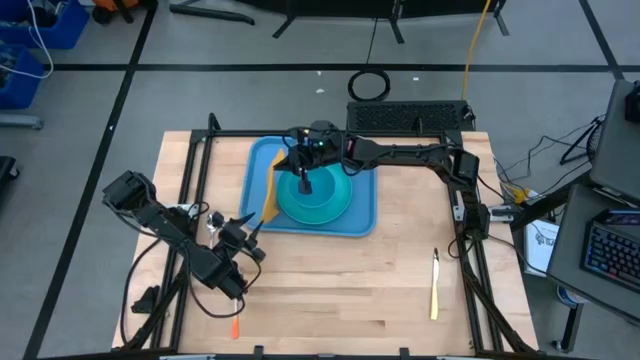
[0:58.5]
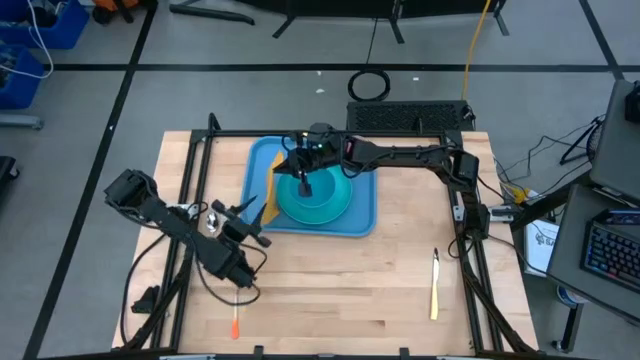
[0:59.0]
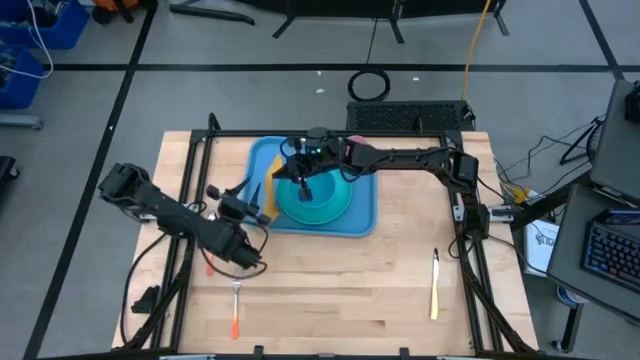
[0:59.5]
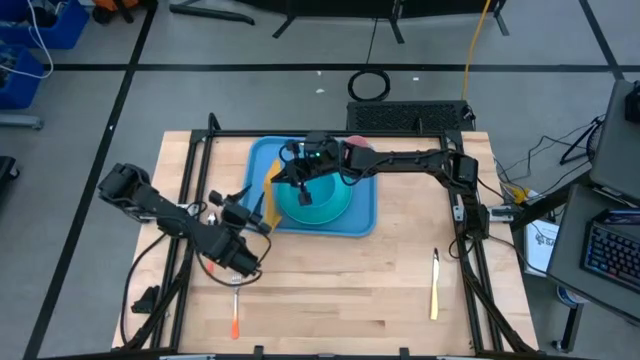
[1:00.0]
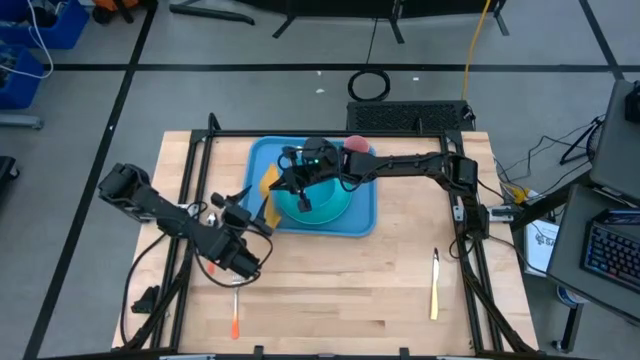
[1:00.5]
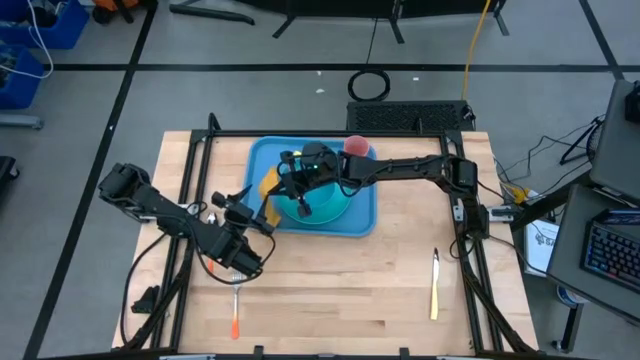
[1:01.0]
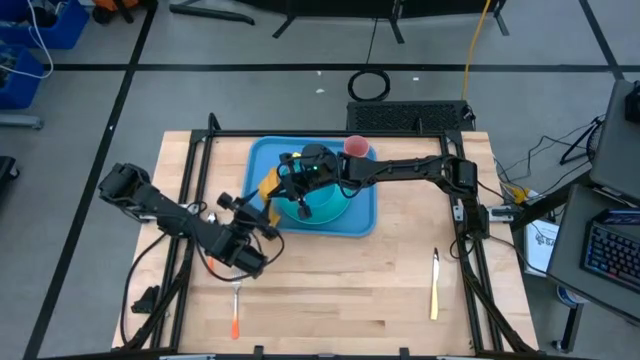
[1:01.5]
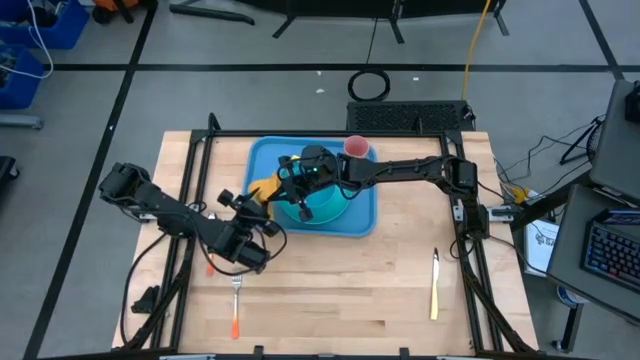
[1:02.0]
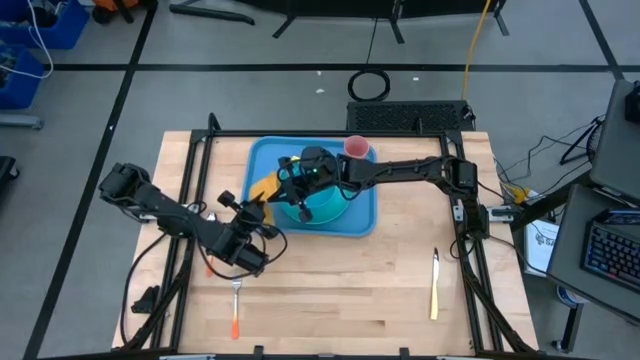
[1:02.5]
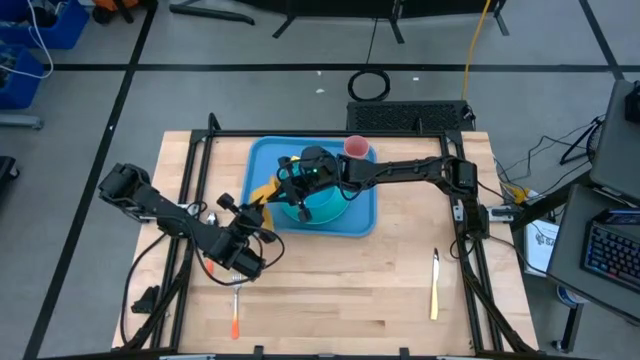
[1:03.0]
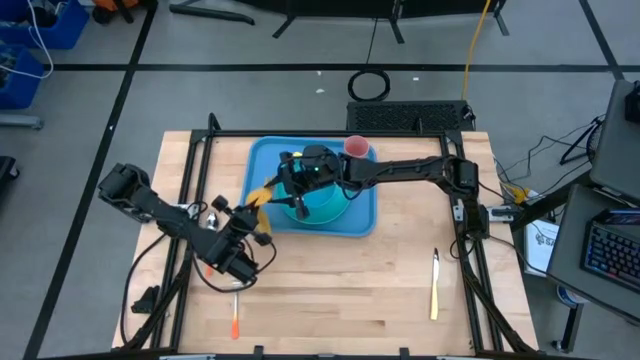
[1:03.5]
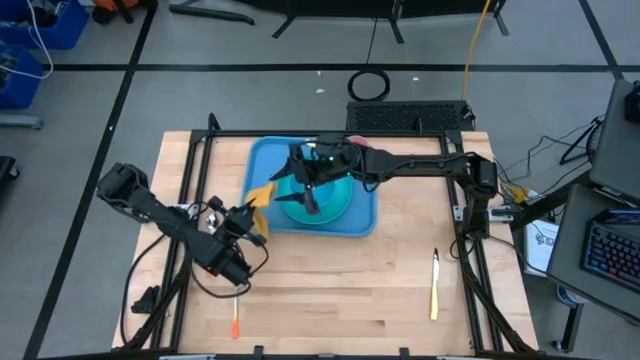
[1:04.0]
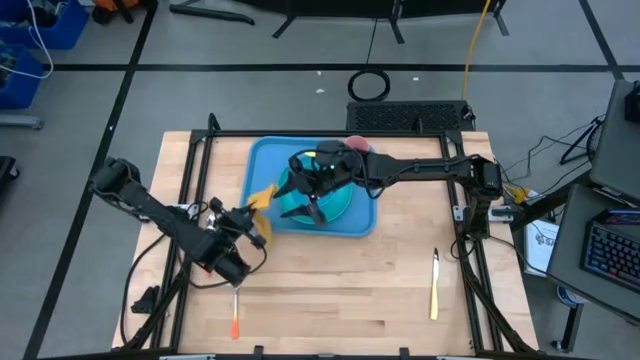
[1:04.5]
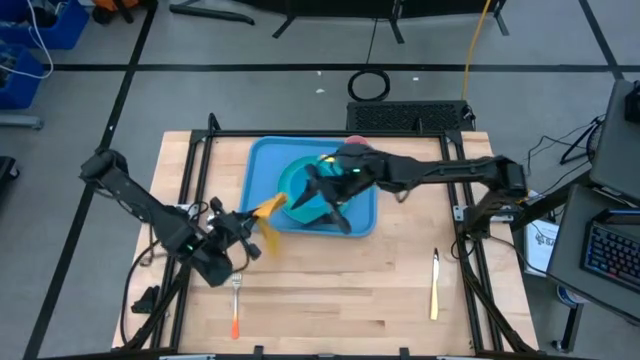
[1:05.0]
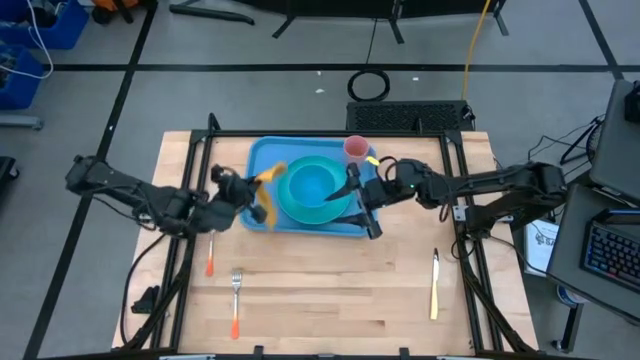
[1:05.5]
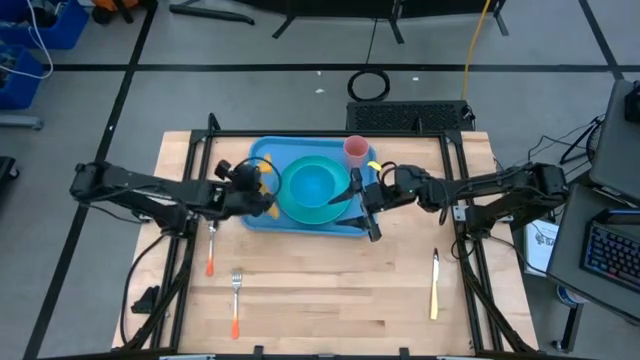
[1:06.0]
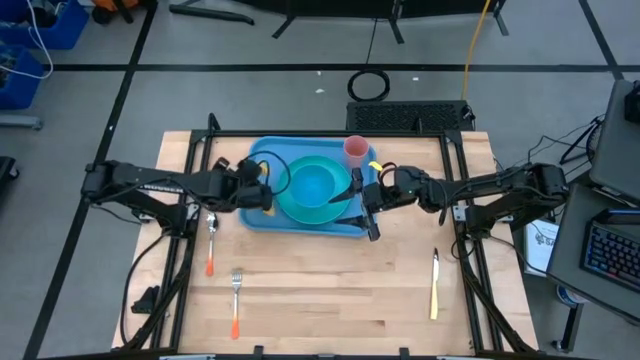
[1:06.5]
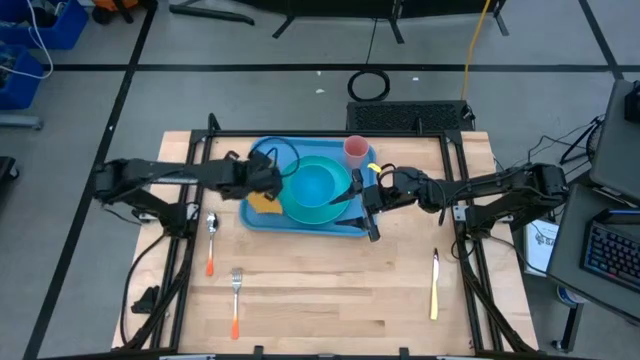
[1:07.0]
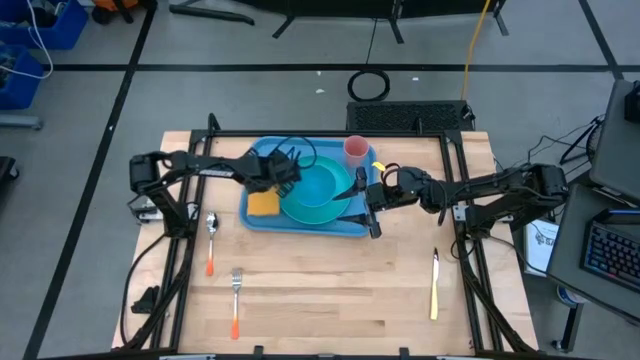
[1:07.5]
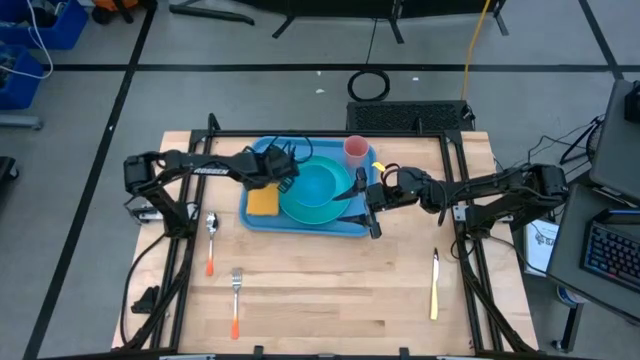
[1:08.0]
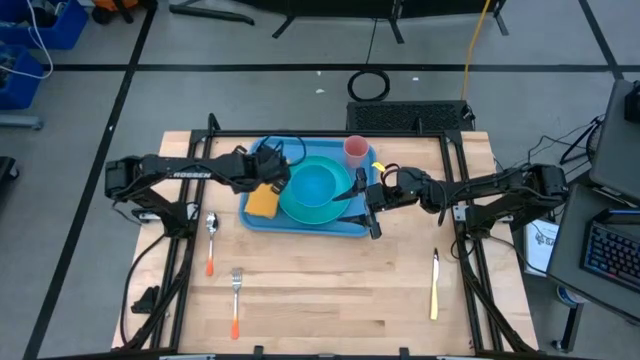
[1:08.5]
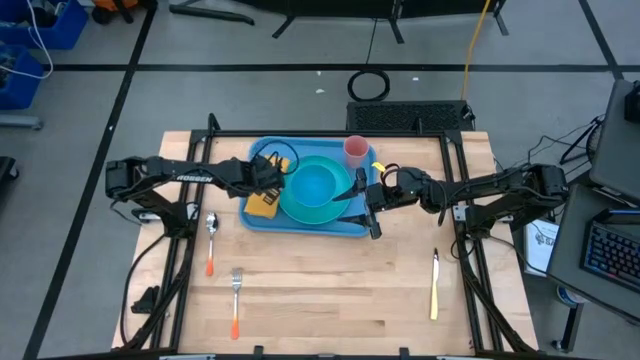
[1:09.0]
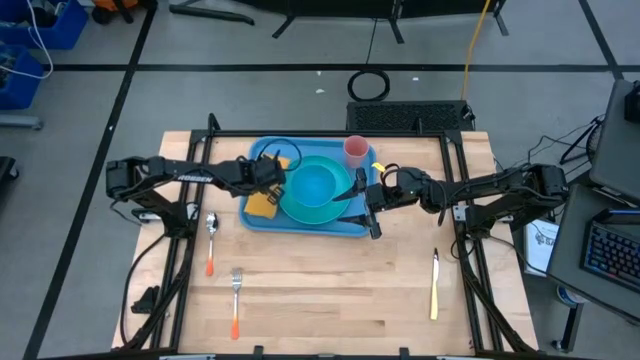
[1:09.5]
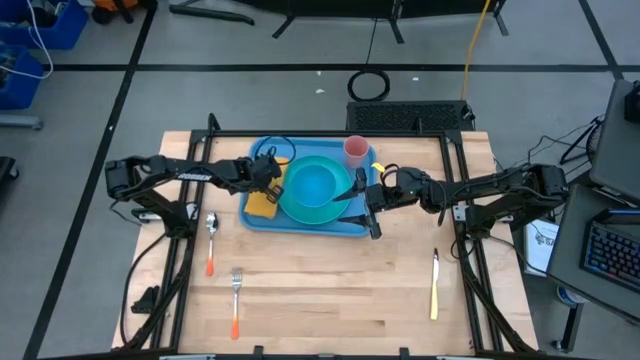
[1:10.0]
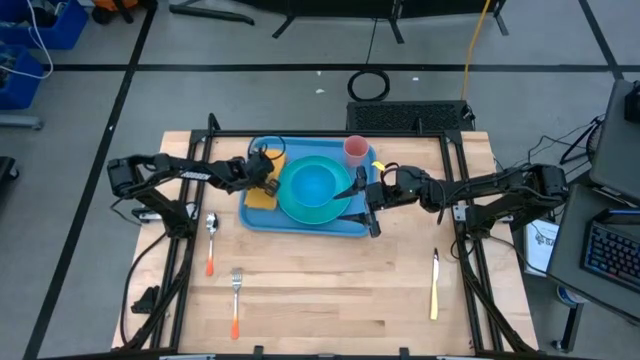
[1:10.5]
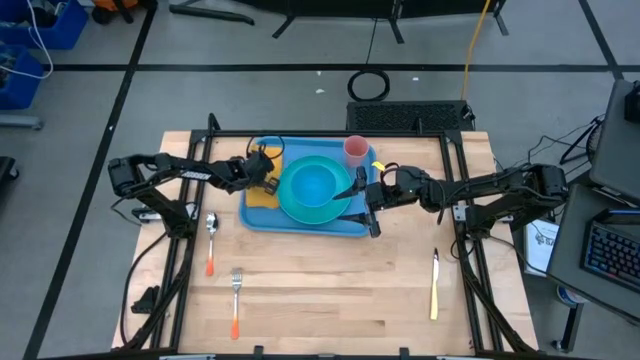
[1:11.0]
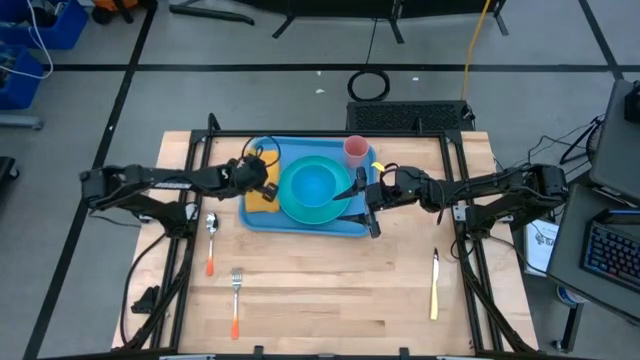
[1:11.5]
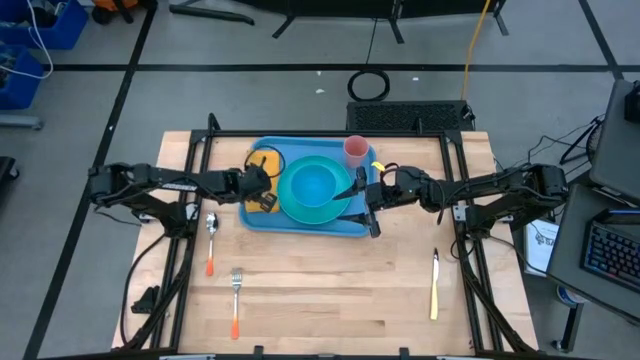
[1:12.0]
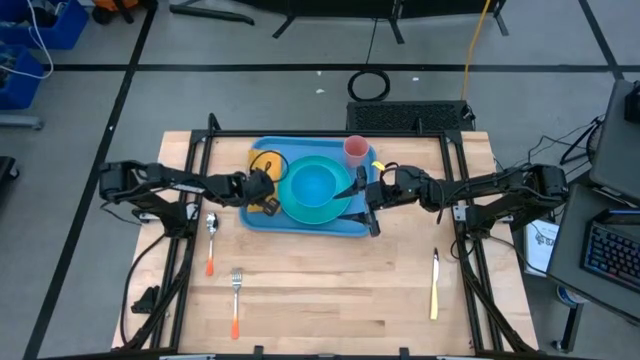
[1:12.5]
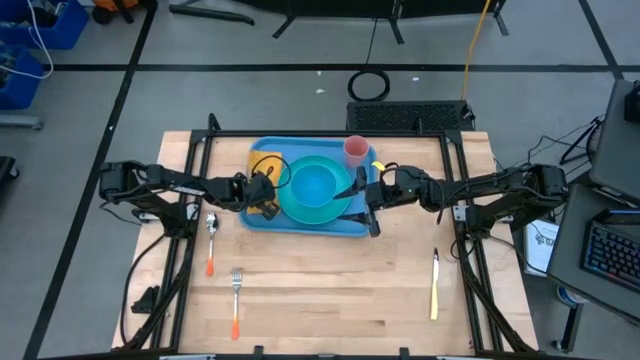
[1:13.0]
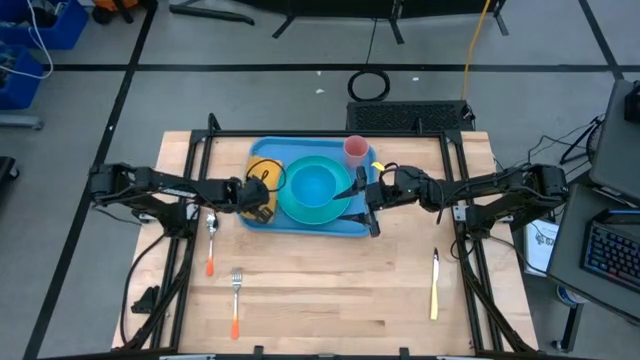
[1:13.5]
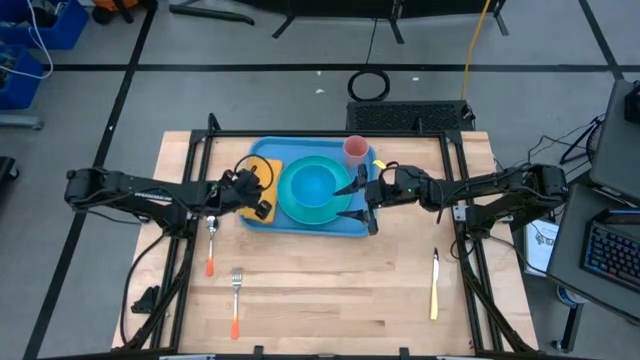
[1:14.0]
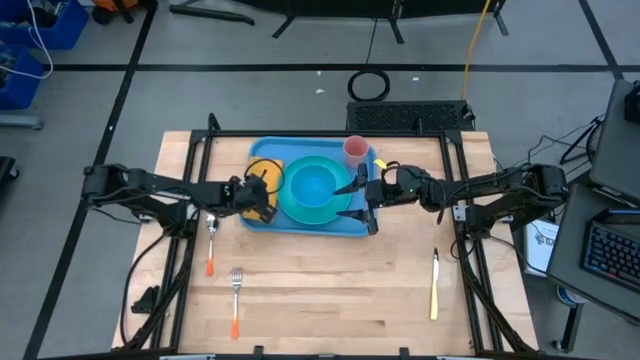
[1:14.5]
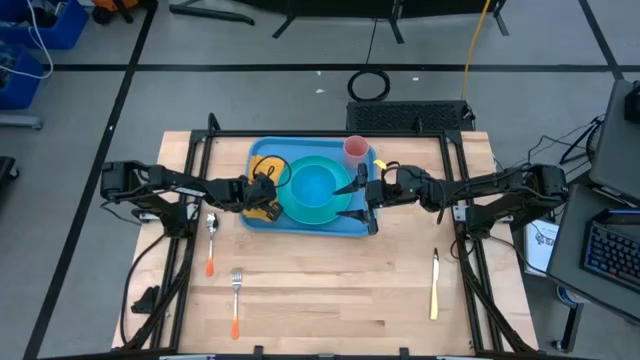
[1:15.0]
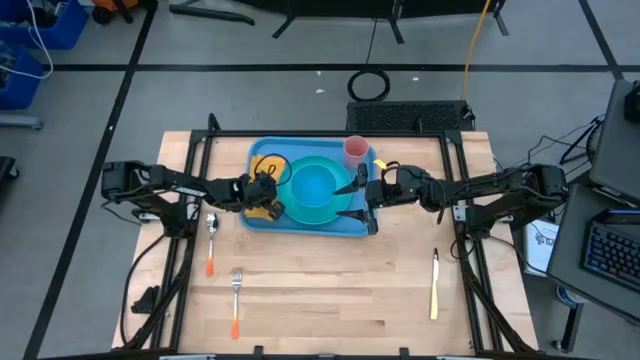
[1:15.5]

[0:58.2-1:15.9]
Task: Set up tray
Put the yellow napkin on the blue serving tray to the left of the green plate

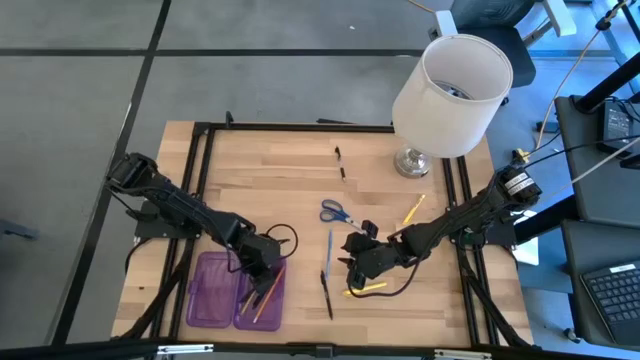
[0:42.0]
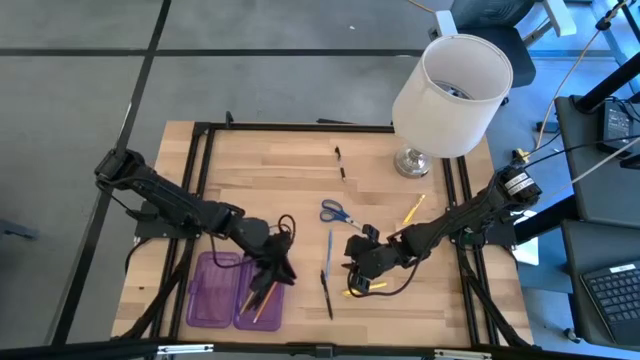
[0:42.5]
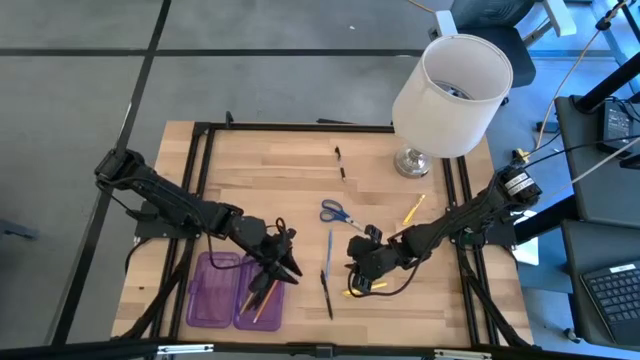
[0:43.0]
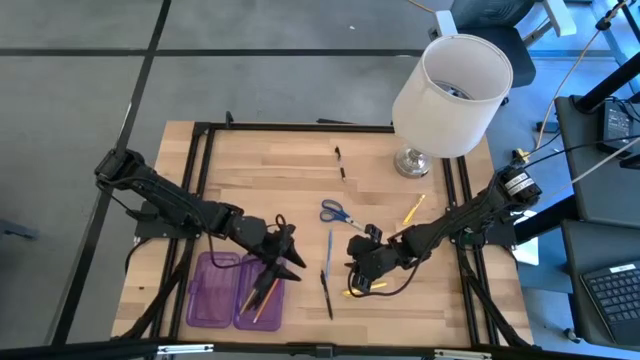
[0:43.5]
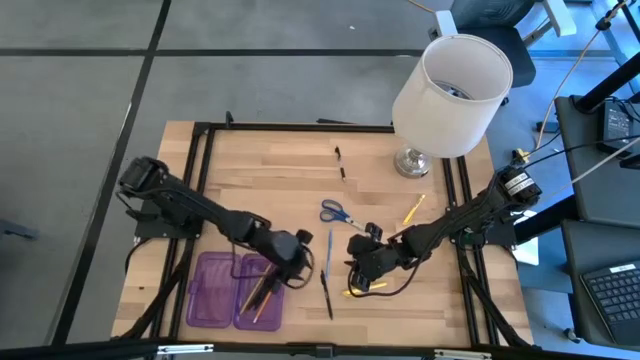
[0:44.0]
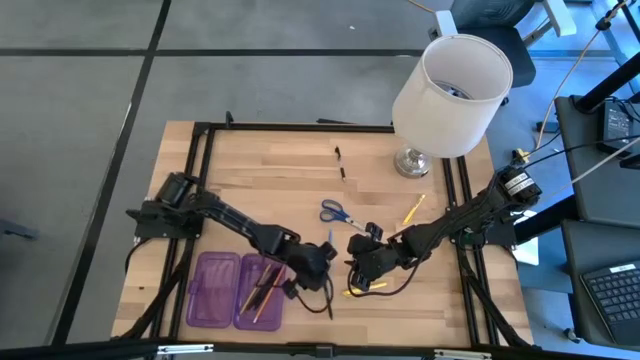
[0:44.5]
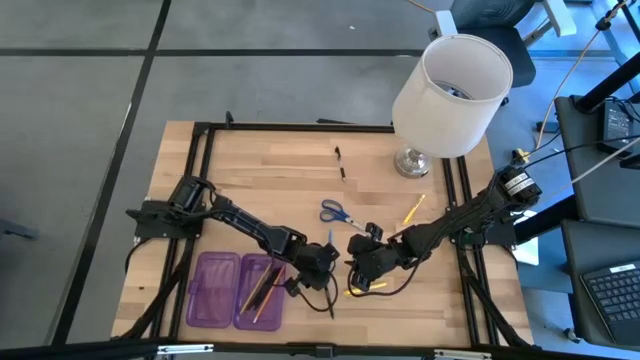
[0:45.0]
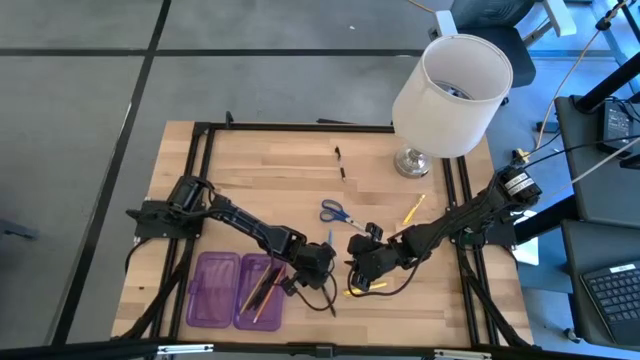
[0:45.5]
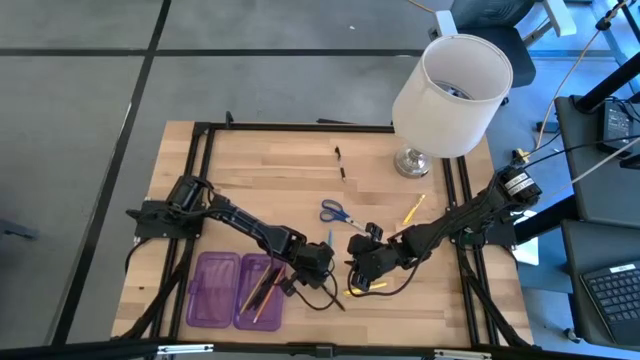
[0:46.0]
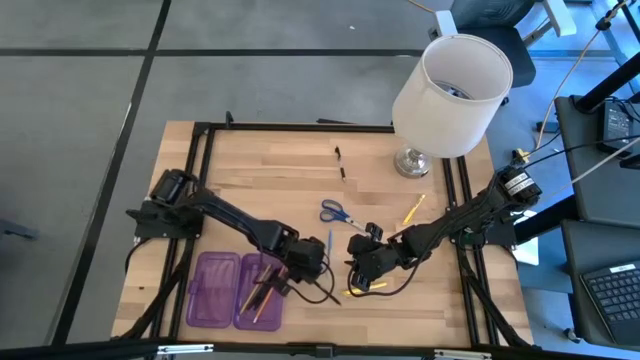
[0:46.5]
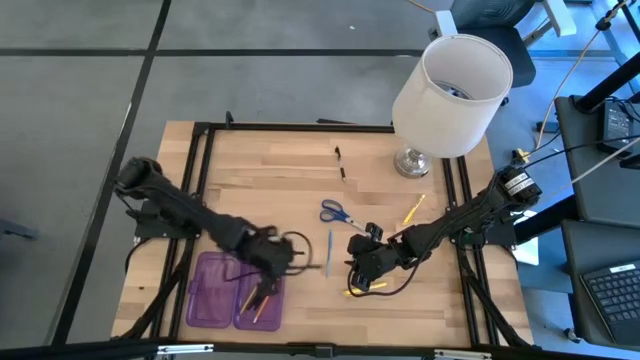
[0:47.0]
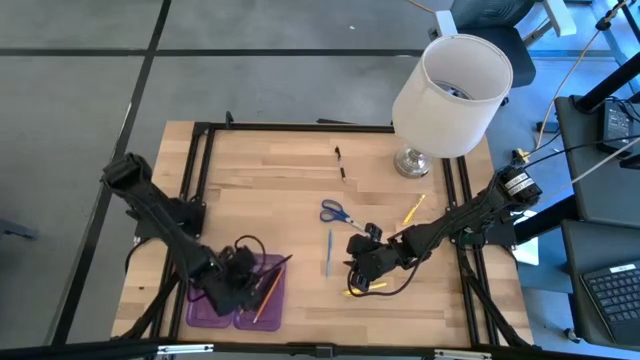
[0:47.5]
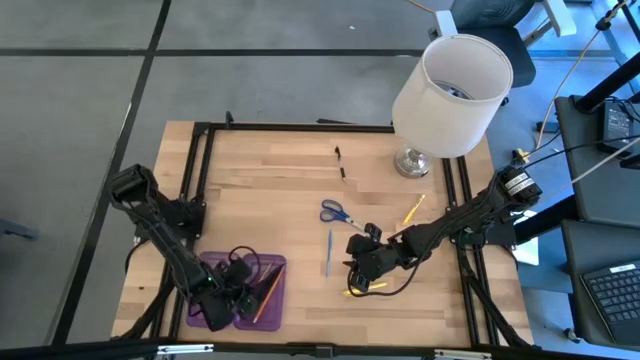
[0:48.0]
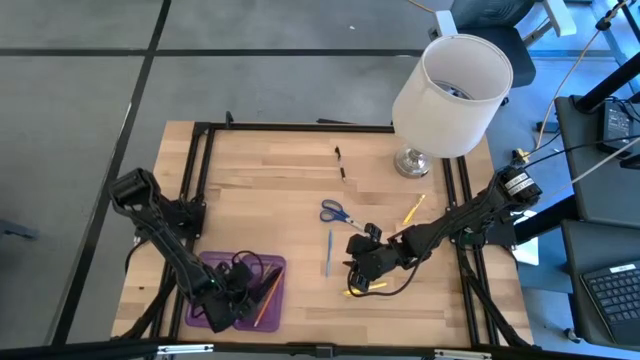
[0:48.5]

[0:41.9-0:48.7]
Task: Pick & place school supplies into a supply box
Put the black pen into the violet box
